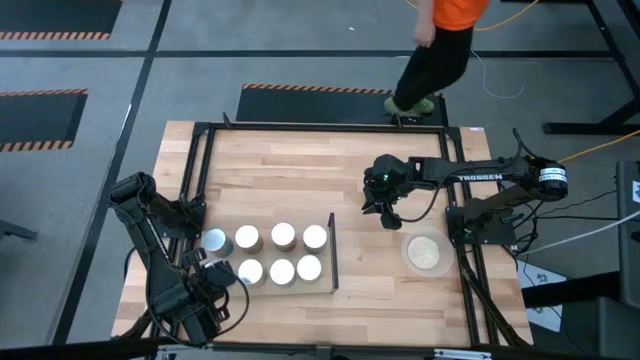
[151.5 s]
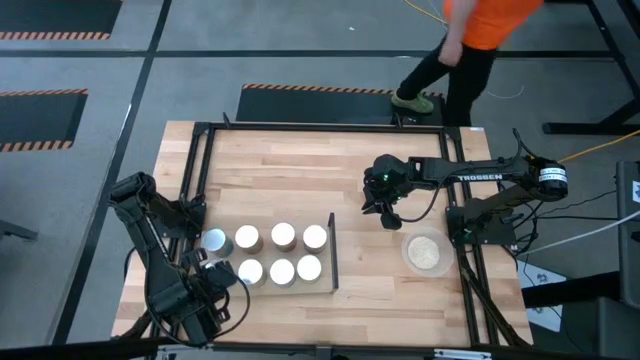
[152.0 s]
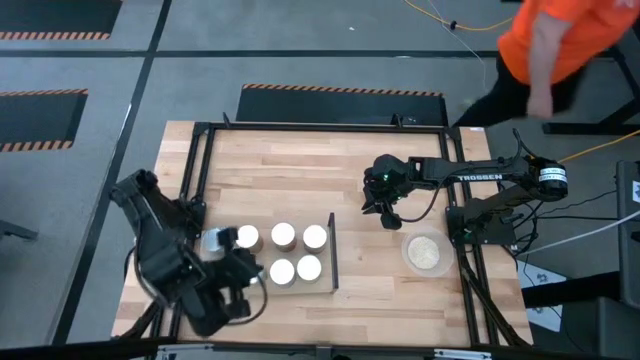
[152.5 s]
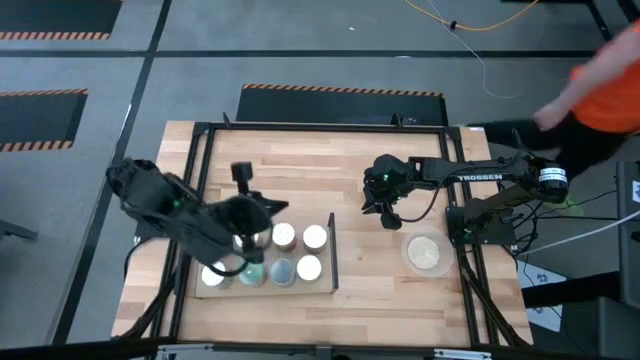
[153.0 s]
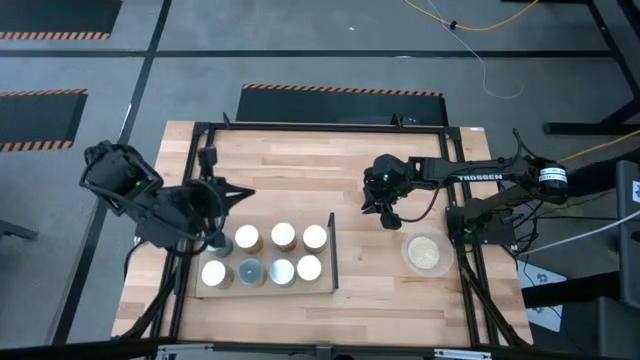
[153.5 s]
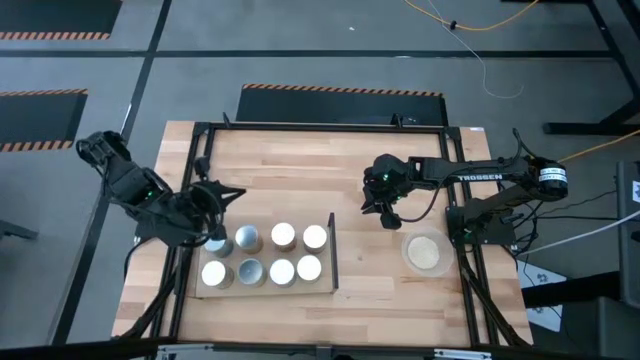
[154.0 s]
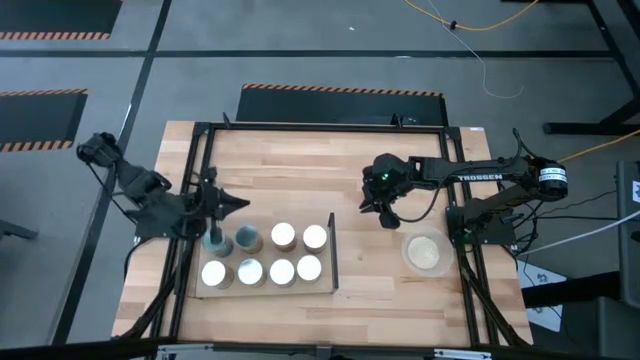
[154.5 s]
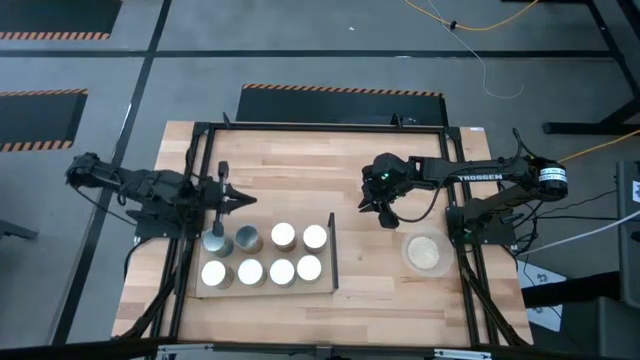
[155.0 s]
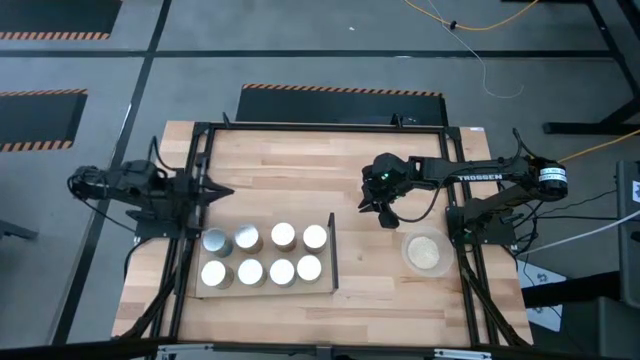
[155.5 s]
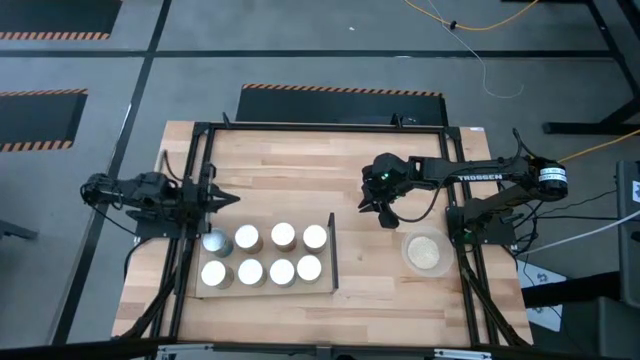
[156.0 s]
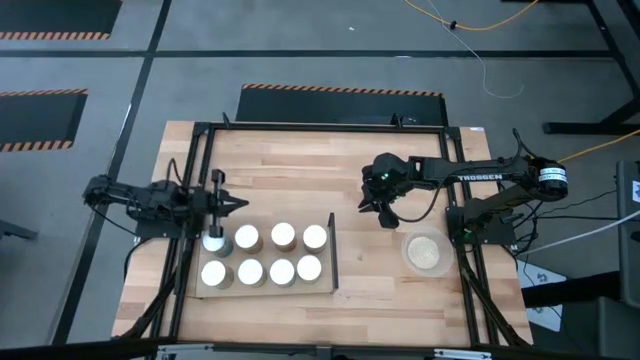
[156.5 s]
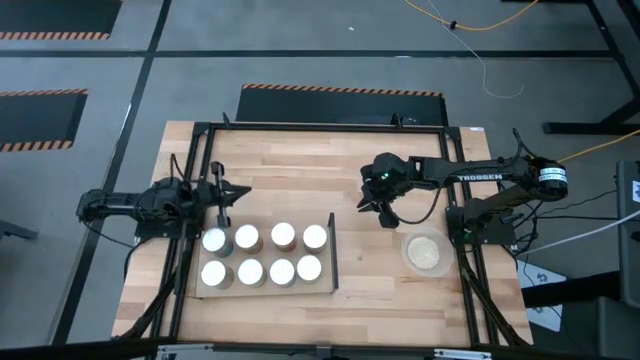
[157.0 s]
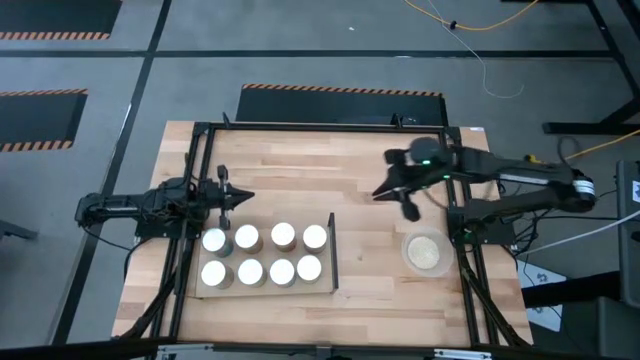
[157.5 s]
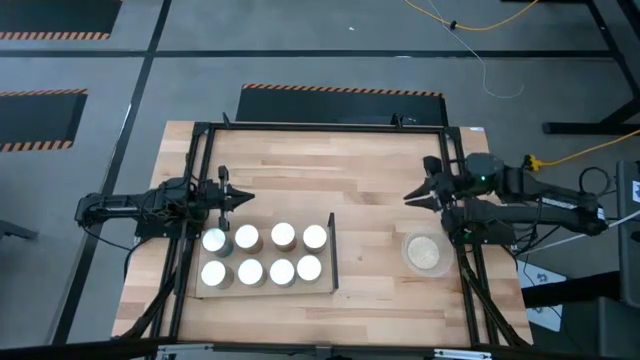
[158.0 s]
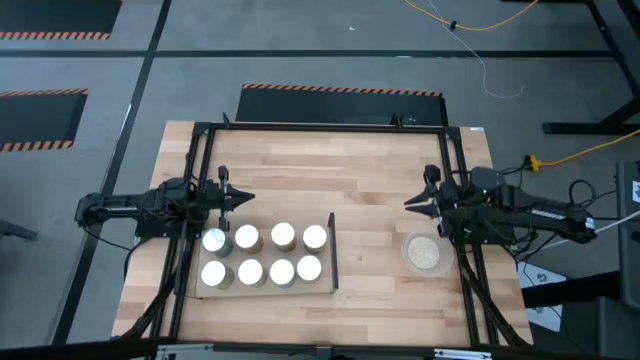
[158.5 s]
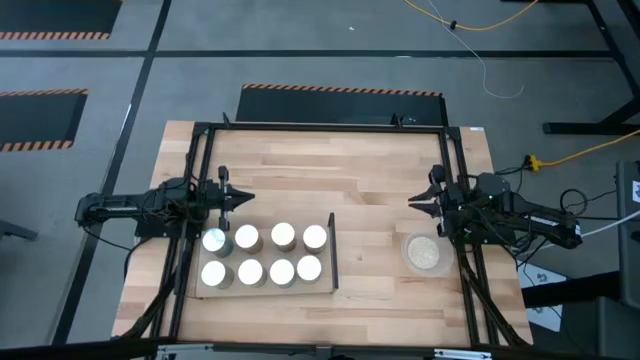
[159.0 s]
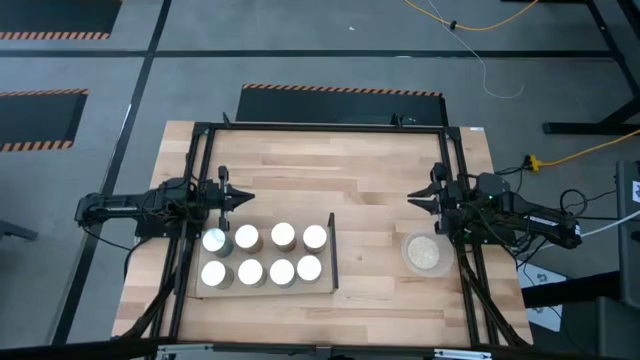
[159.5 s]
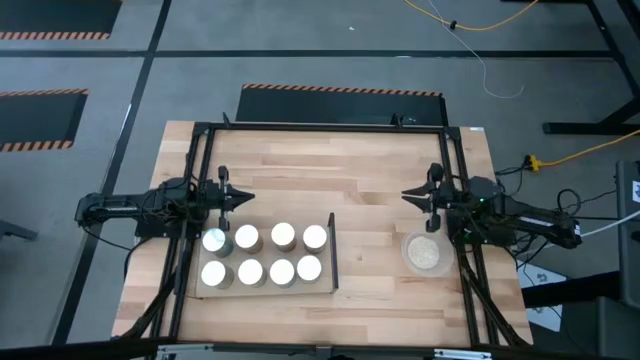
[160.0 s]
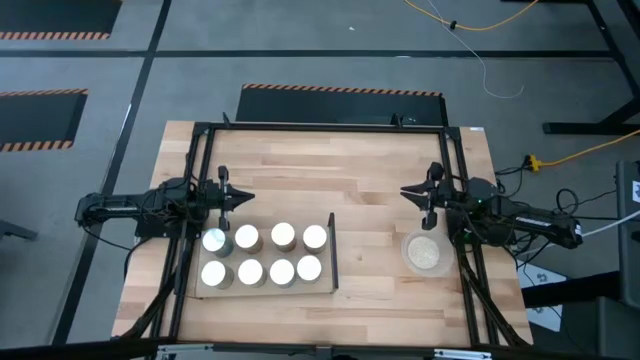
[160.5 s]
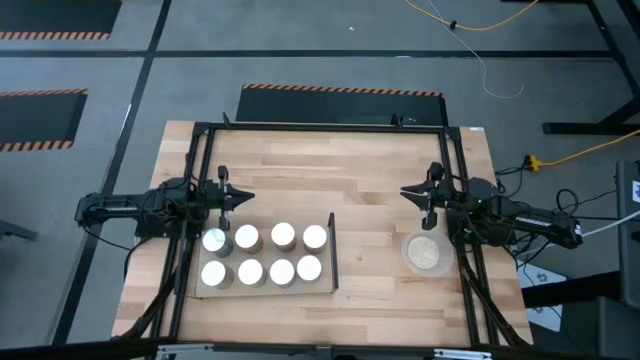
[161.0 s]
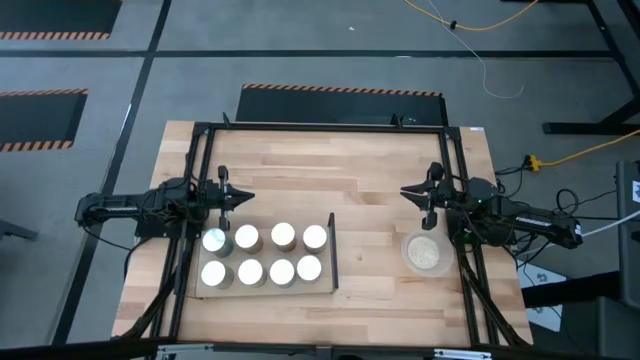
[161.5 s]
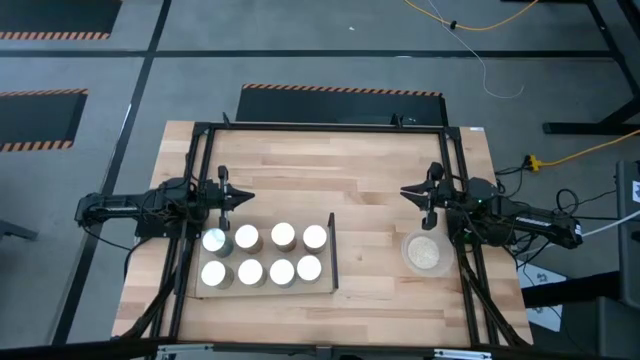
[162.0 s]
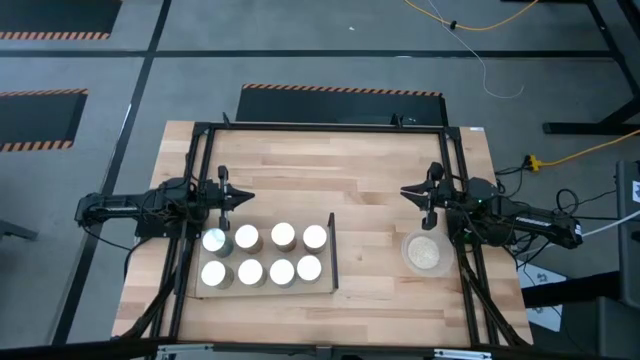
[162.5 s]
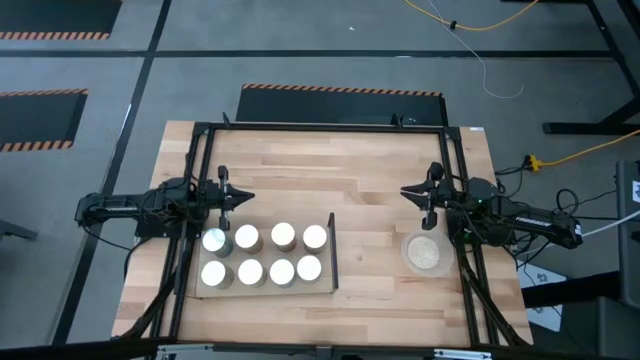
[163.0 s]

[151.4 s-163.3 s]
Task: Pick and place cans onto a shelf
Return to Home Position

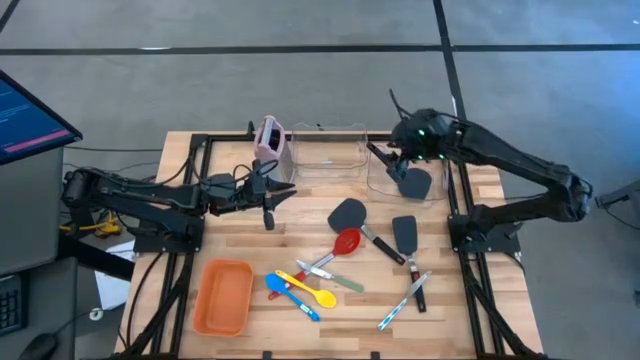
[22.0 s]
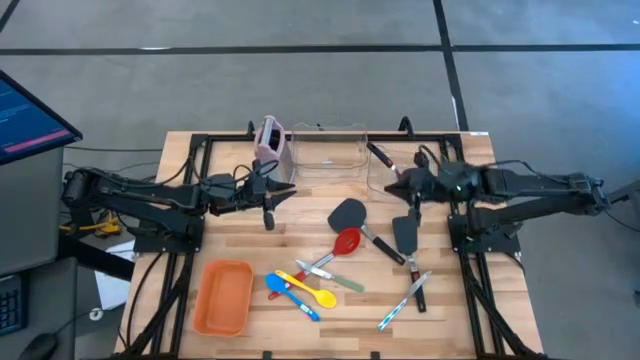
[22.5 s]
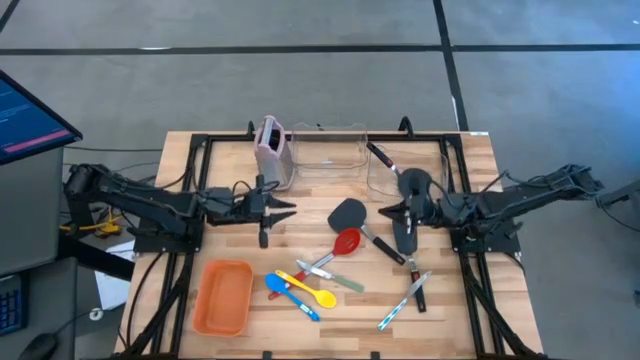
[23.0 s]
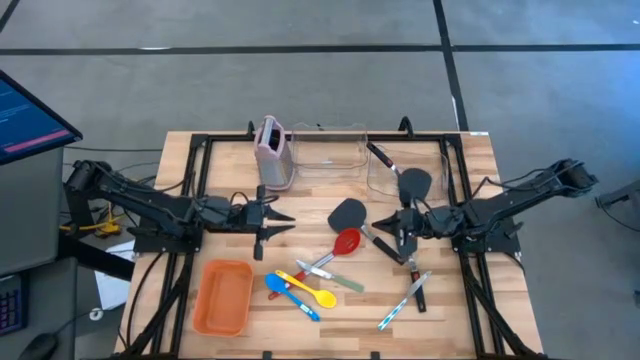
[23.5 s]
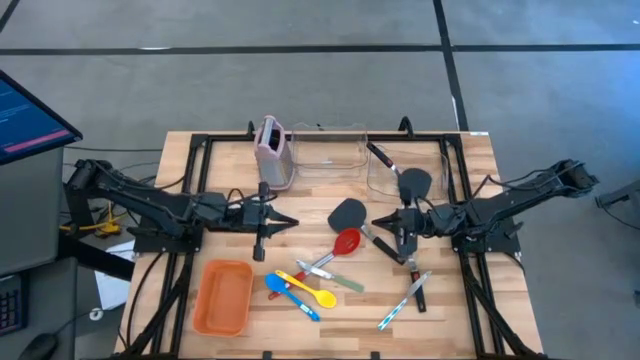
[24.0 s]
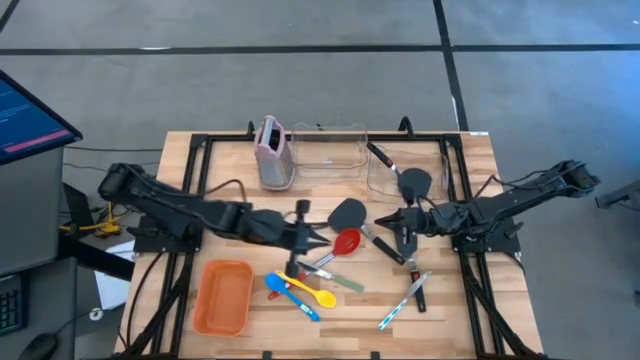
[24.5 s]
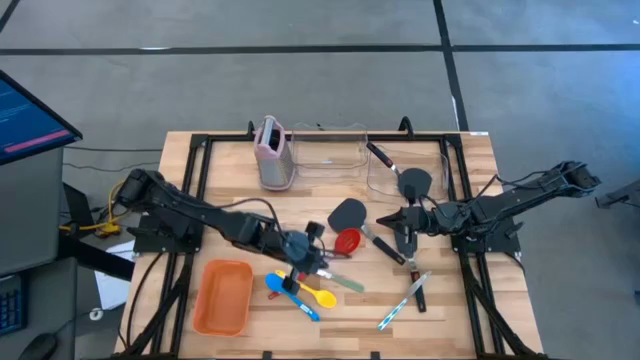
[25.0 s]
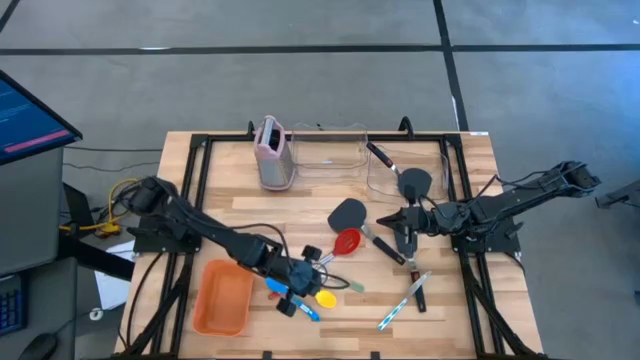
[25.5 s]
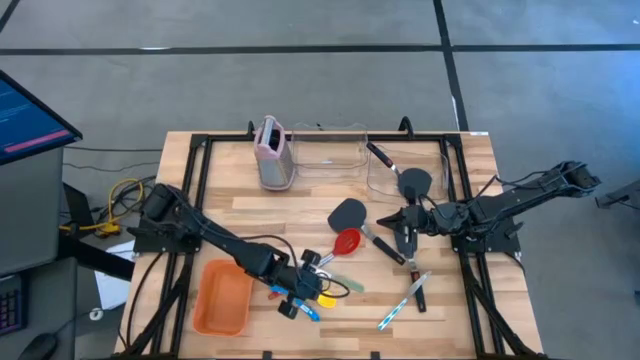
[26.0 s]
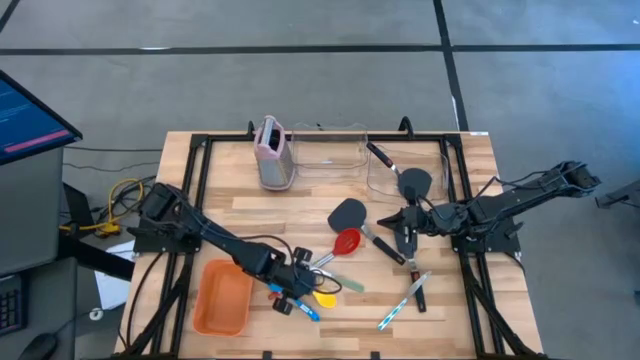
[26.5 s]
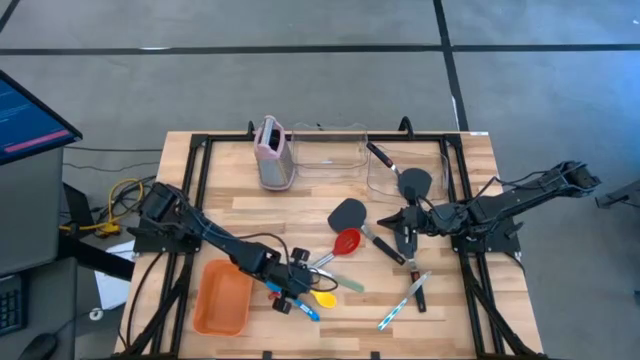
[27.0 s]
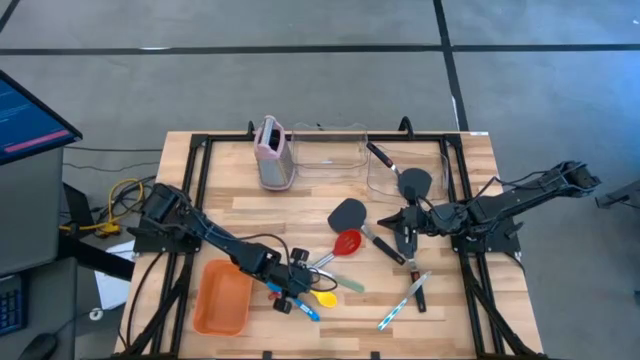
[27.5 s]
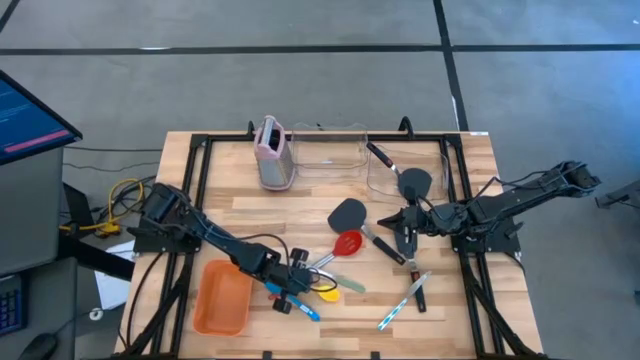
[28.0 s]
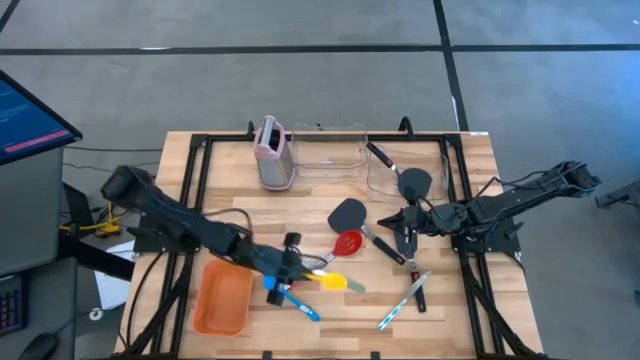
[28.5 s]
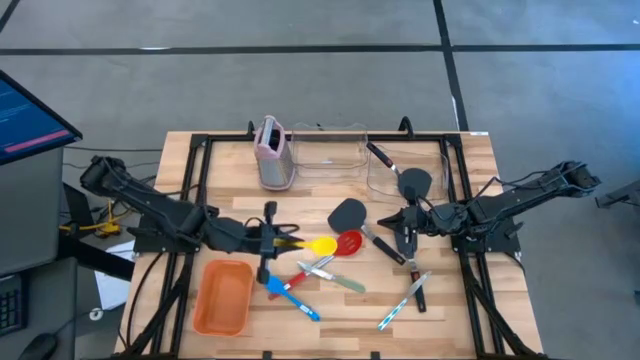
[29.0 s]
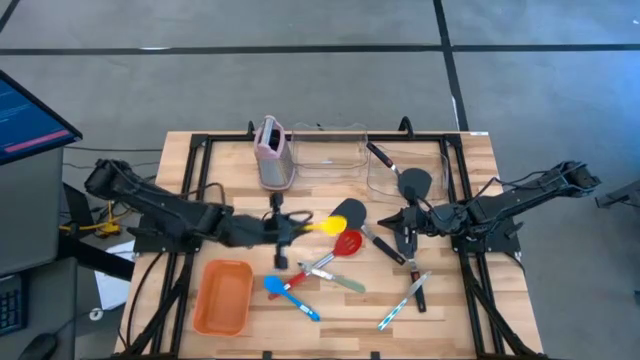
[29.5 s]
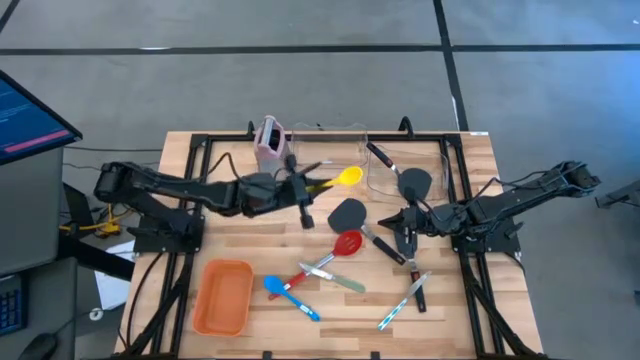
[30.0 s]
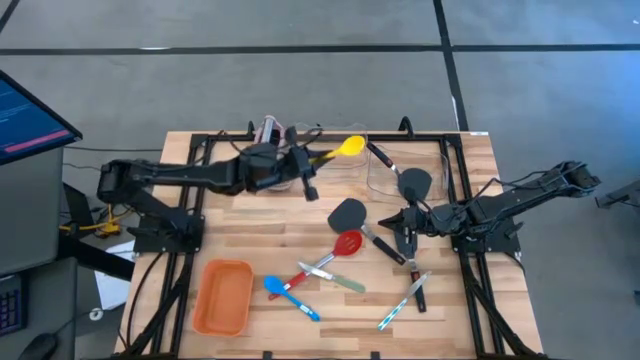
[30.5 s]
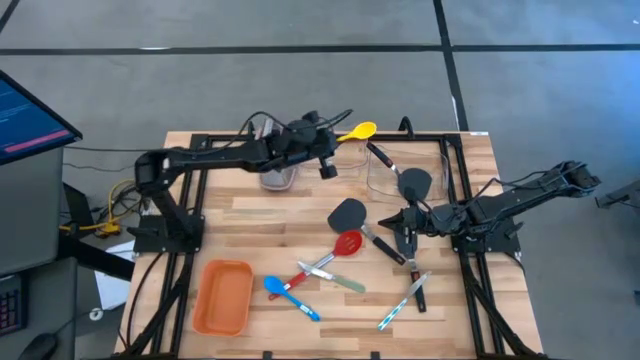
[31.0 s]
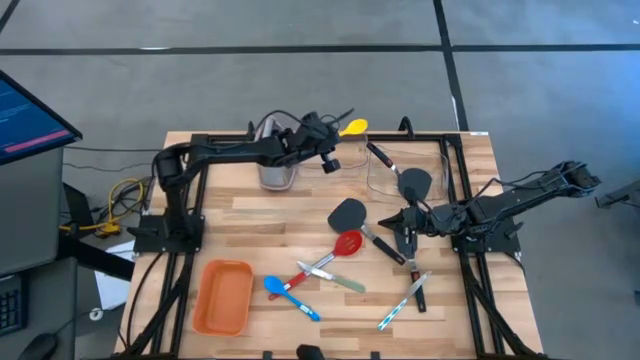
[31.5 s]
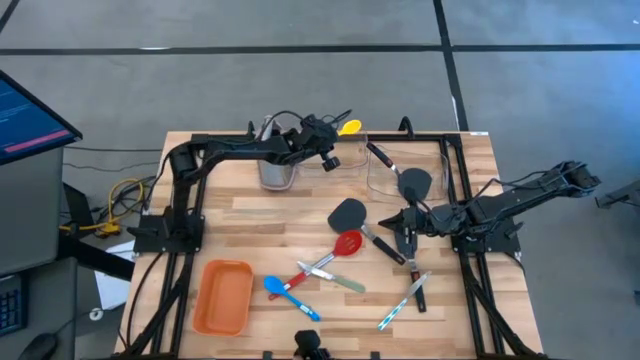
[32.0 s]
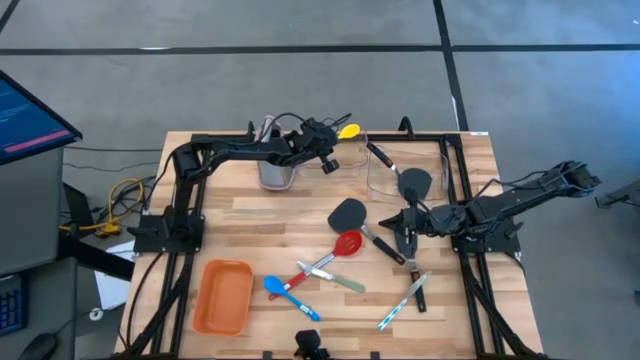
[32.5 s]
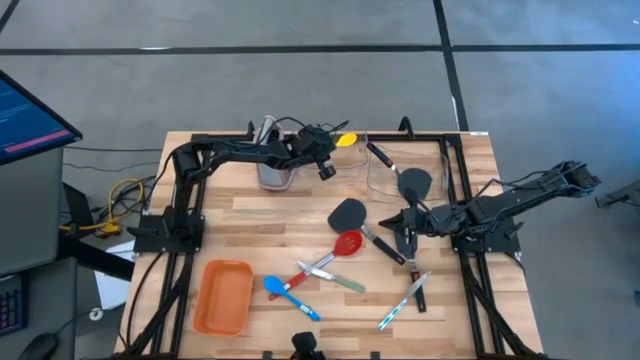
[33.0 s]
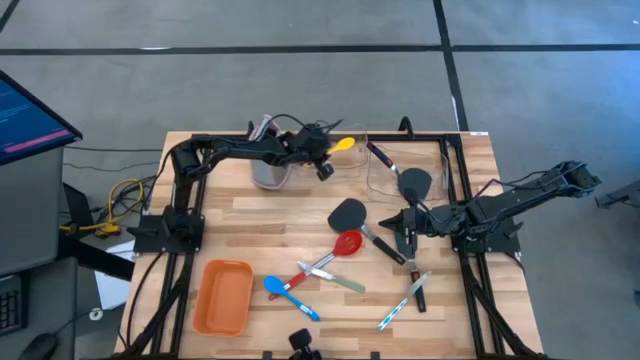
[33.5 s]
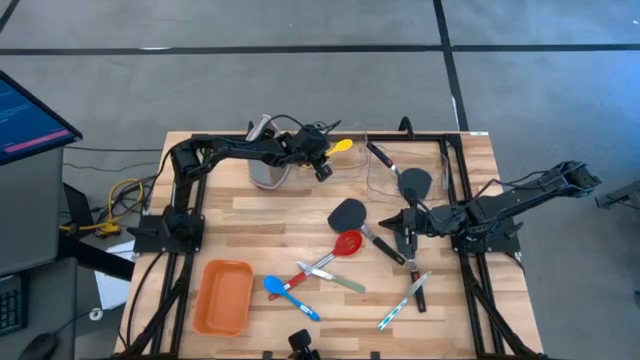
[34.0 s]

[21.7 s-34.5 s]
Task: Pick & Place Kitchen Items
Put the yellow serving spoon into the left transparent bin
